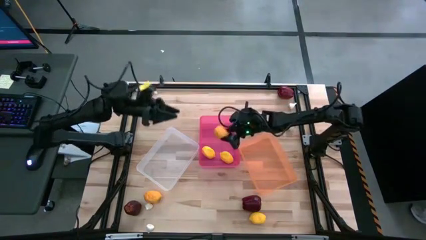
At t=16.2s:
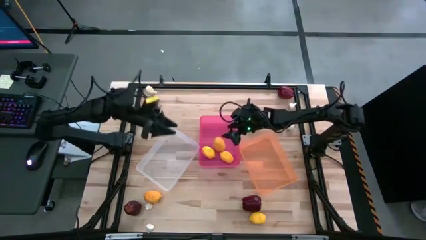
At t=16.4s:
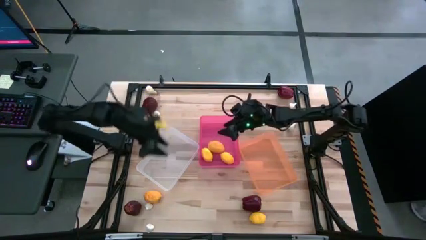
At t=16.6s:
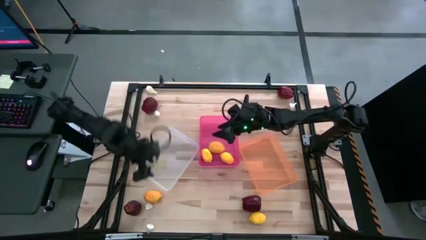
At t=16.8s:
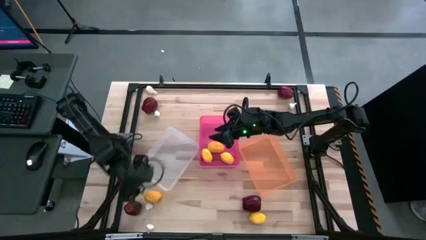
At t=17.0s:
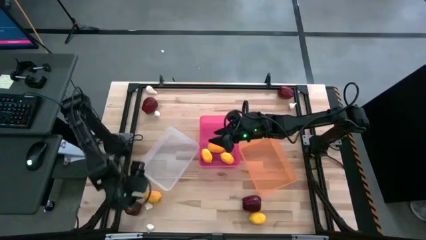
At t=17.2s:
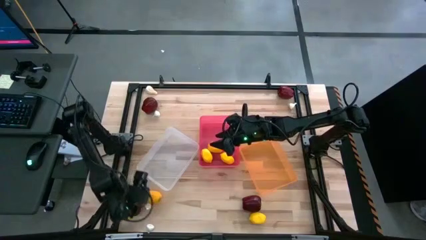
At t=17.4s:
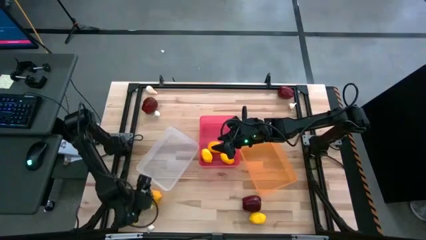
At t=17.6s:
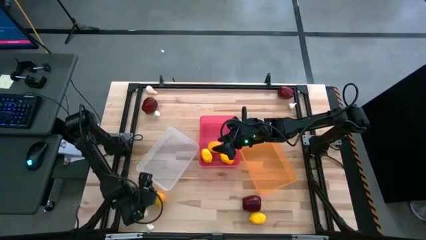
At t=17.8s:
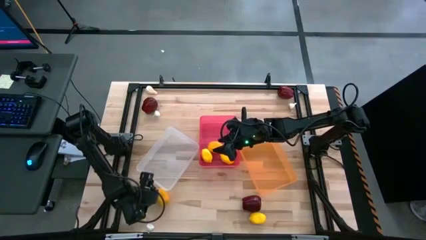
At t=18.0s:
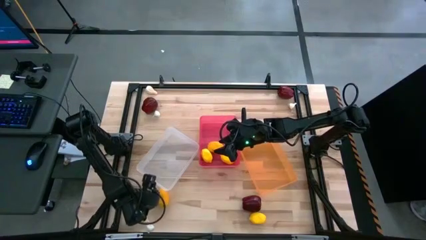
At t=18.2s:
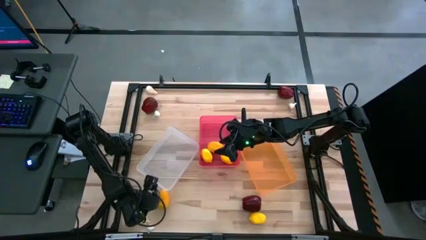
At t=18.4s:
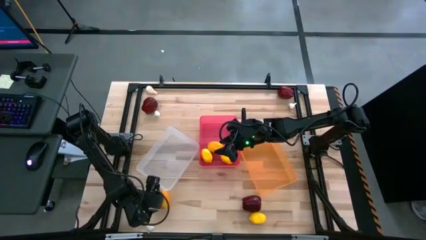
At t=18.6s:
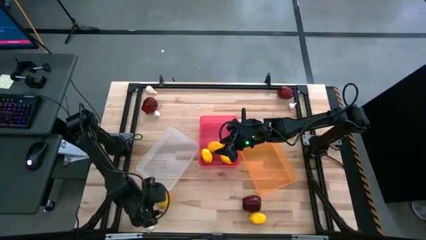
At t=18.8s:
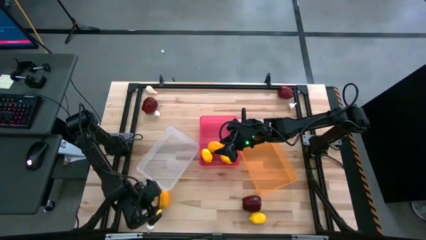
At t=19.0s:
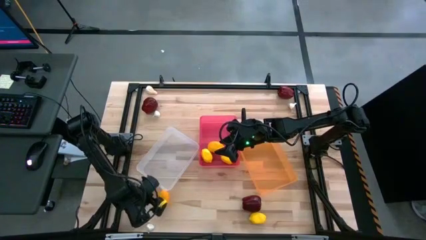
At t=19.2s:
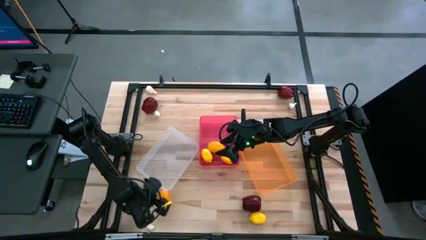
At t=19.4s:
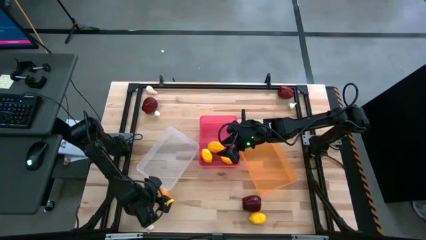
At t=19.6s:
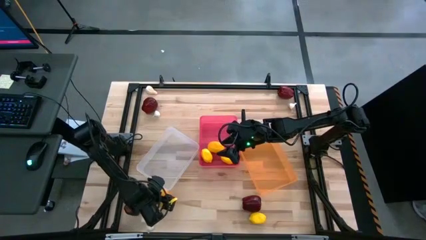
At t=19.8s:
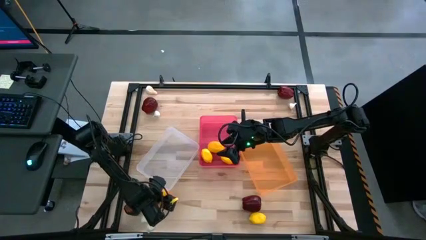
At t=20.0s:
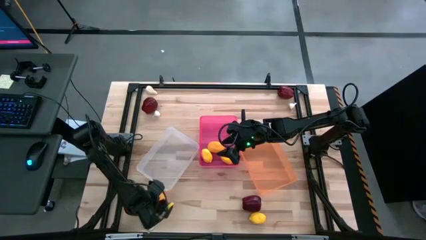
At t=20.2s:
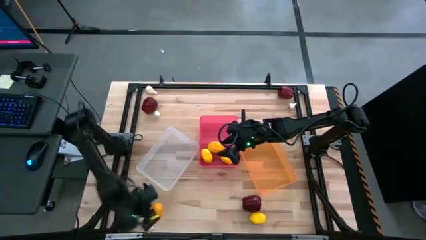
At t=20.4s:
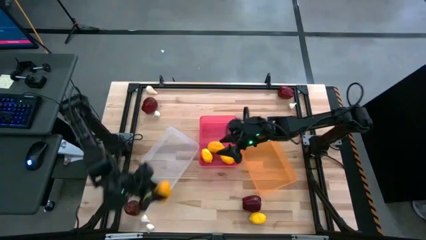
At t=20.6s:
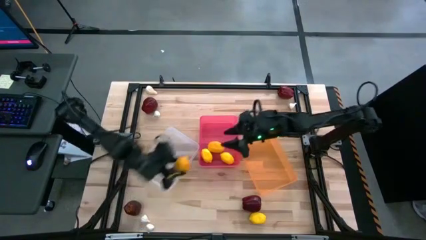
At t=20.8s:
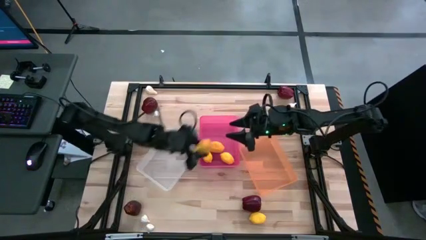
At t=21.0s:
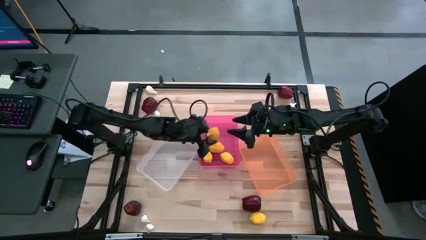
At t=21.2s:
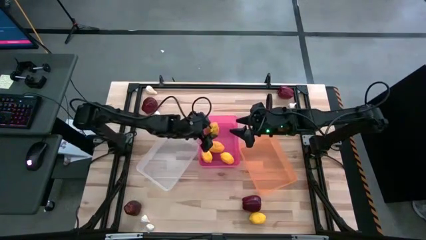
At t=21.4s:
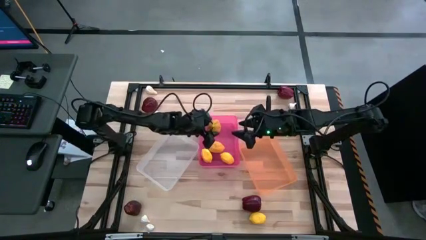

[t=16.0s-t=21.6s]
Task: Sort produce into baskets
Put the yellow lemon into the red bin

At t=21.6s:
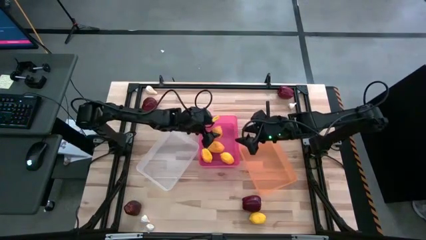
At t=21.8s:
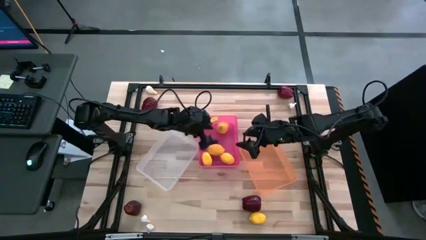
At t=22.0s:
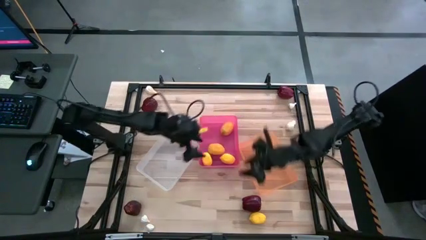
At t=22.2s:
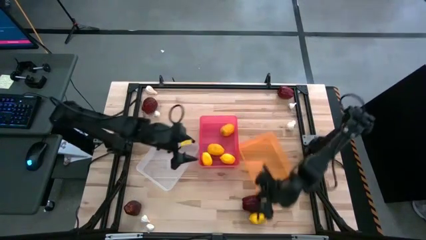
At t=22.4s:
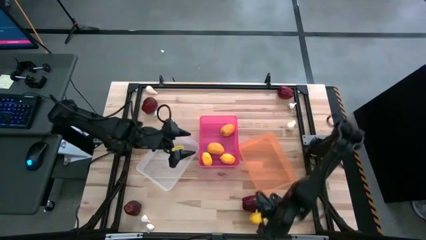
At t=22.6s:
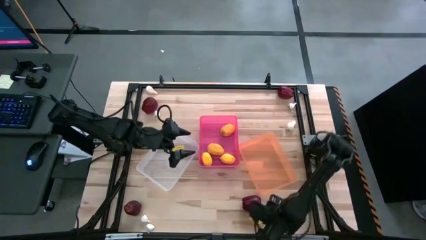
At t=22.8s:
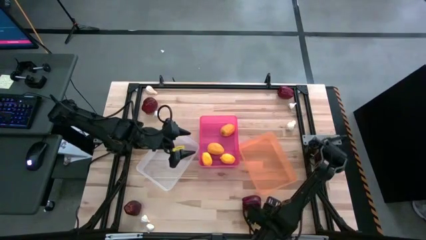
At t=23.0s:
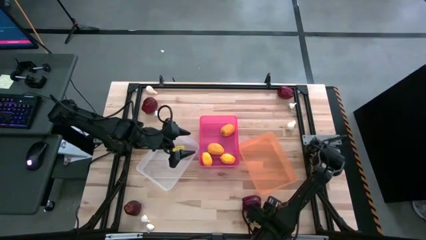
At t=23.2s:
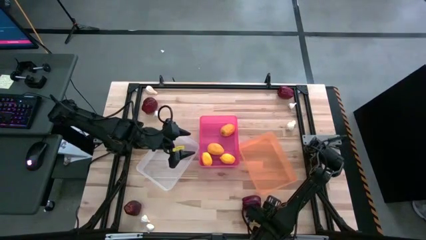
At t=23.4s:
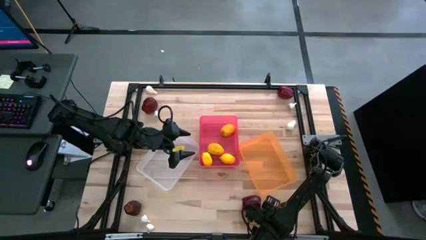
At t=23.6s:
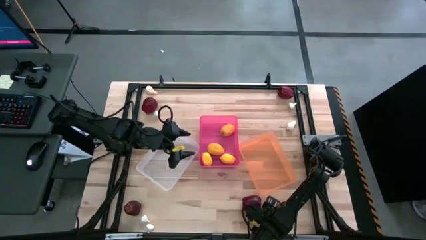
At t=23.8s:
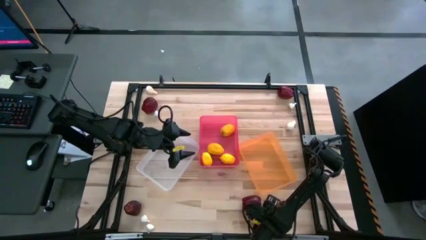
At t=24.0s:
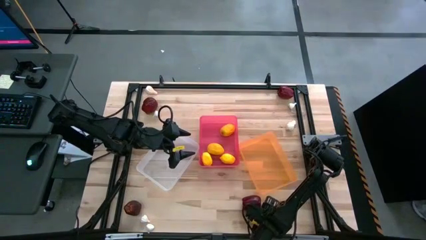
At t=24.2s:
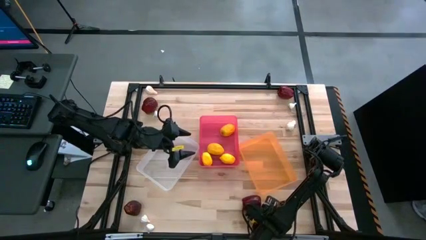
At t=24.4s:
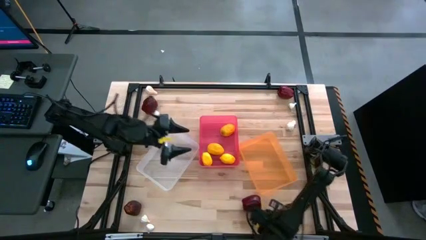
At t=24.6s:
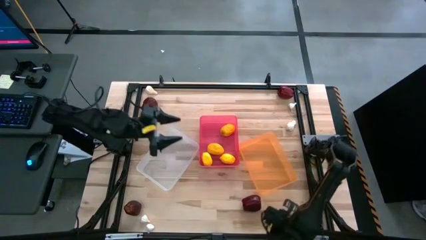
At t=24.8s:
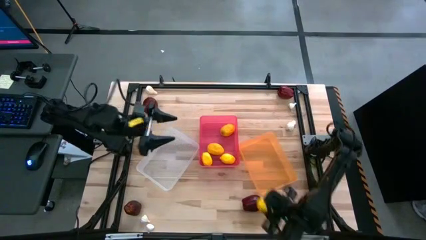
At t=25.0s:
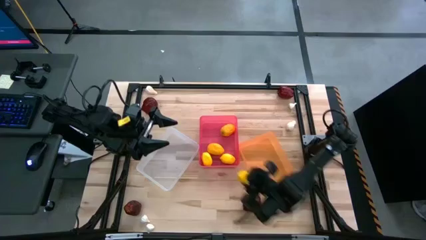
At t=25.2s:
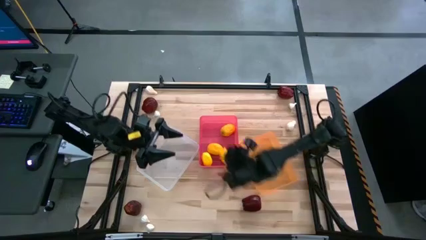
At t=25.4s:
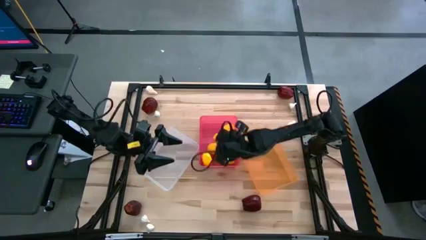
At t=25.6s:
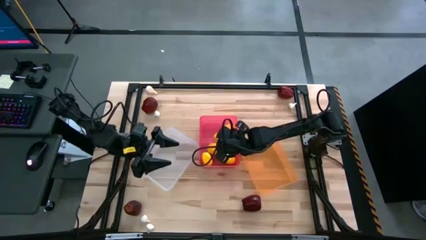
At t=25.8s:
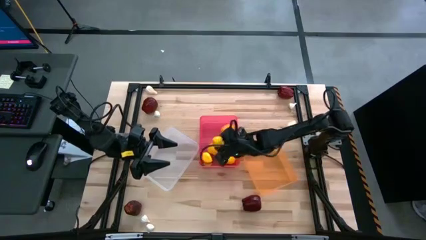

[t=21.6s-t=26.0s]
Put the yellow lemon into the red bin

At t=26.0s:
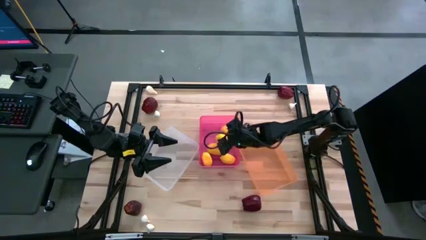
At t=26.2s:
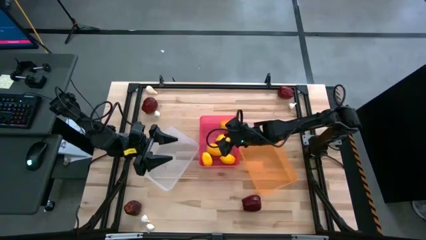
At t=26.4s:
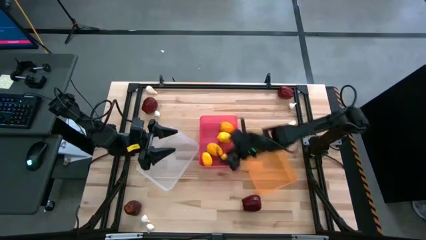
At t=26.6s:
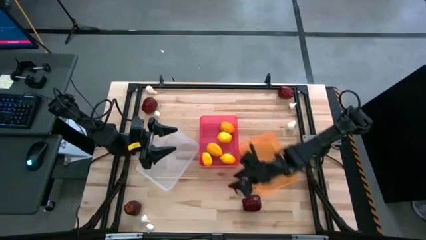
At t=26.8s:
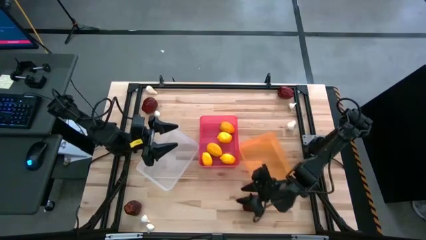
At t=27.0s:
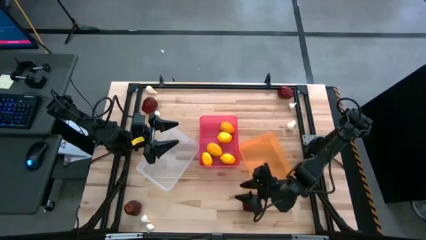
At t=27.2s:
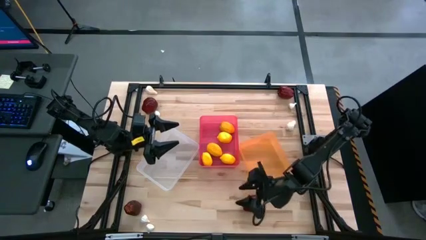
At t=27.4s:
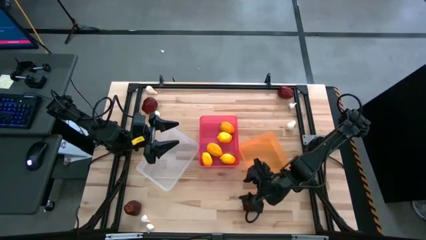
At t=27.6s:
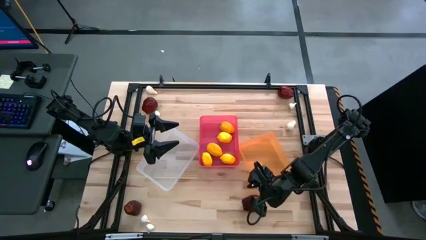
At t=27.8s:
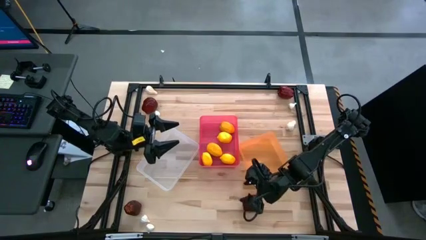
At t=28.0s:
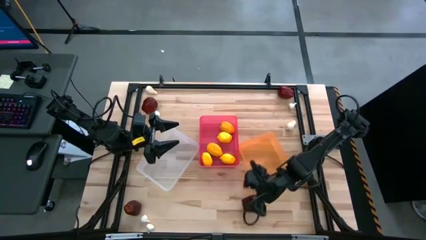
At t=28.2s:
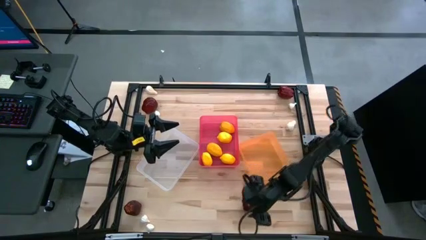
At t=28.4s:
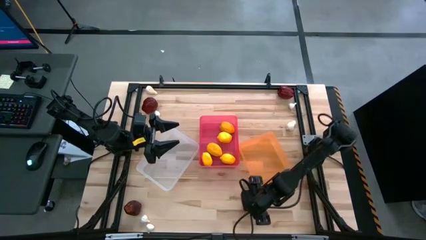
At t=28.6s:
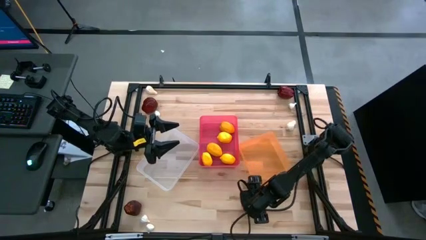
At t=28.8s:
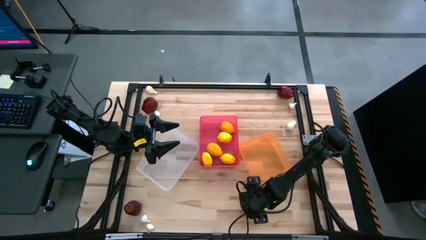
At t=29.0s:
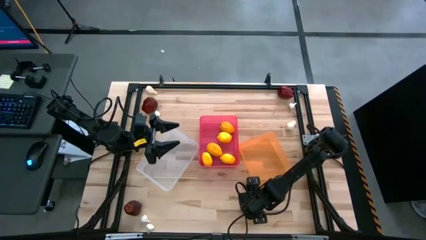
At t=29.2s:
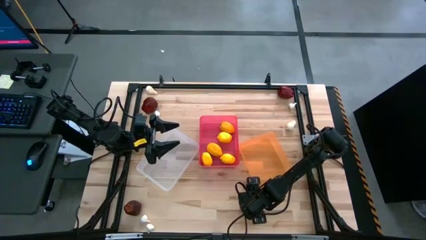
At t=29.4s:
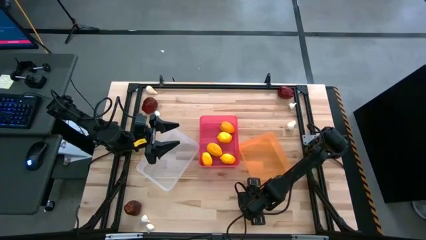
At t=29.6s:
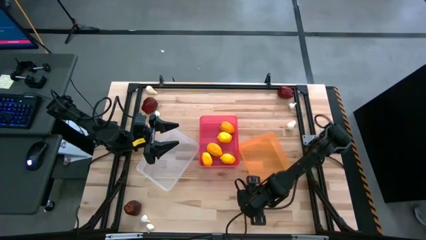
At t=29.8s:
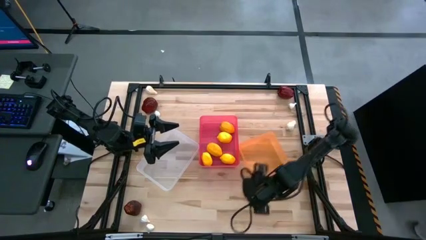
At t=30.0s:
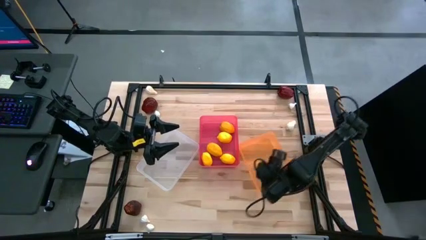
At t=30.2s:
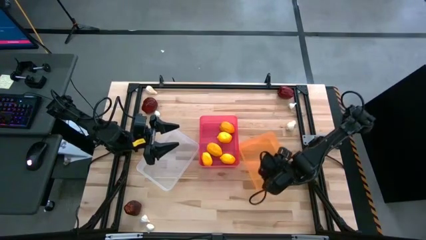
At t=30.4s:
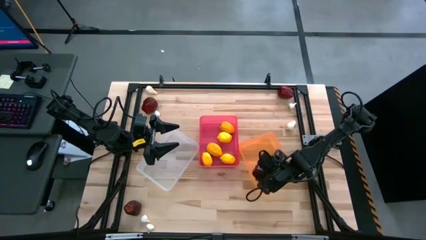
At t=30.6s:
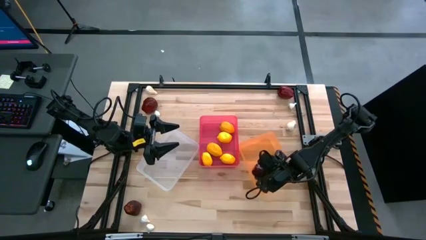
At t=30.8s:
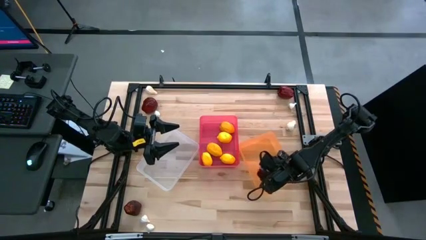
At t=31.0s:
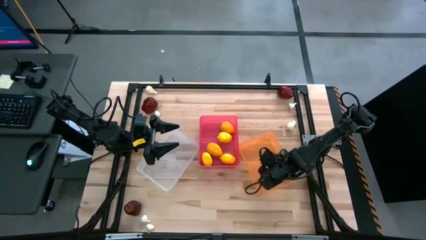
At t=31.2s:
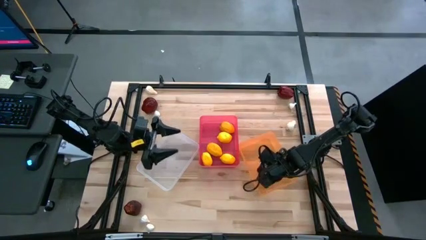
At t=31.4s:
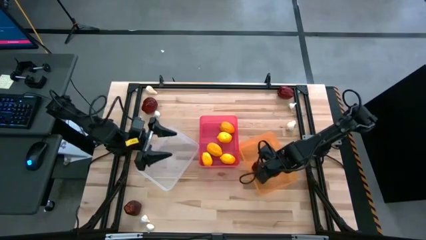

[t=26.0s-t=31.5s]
Put the red apple into the orange bin

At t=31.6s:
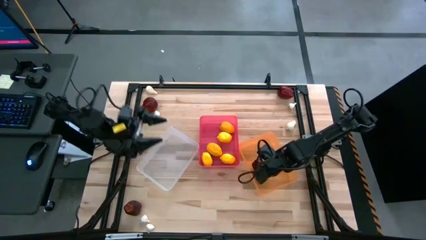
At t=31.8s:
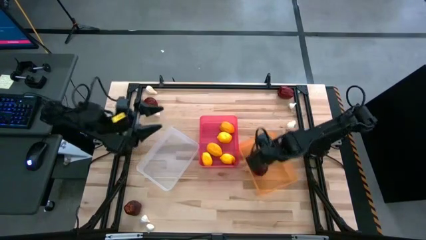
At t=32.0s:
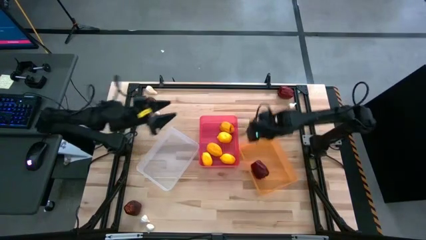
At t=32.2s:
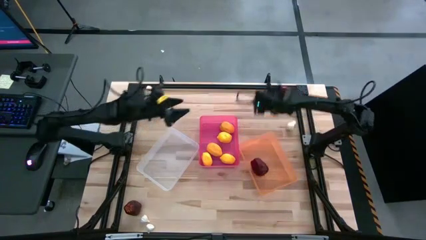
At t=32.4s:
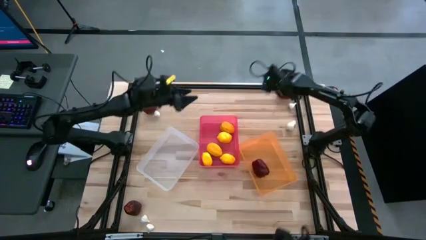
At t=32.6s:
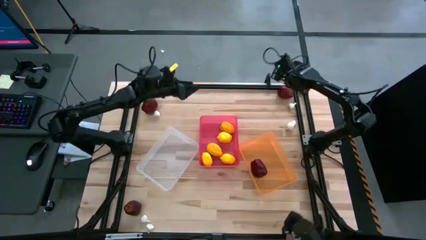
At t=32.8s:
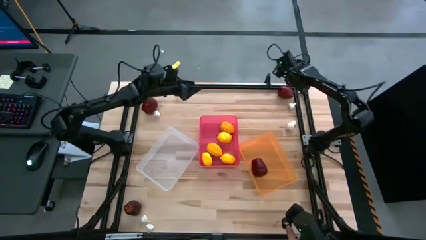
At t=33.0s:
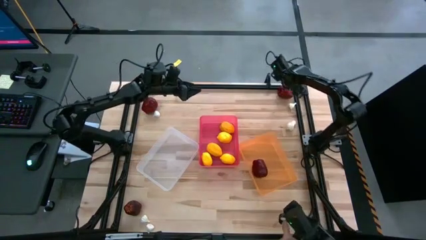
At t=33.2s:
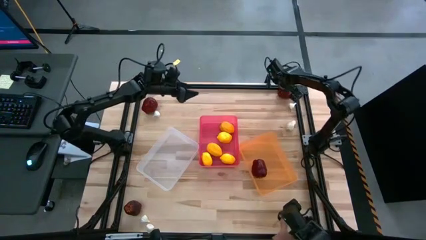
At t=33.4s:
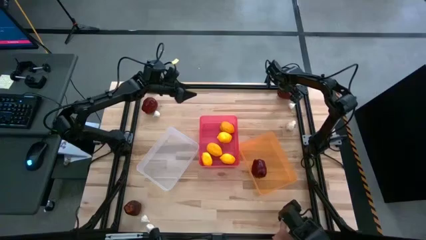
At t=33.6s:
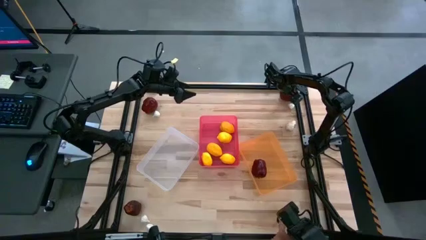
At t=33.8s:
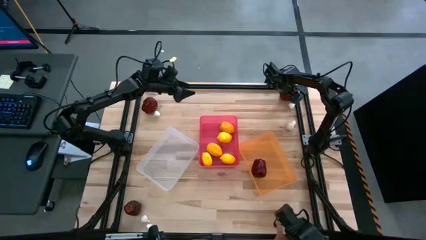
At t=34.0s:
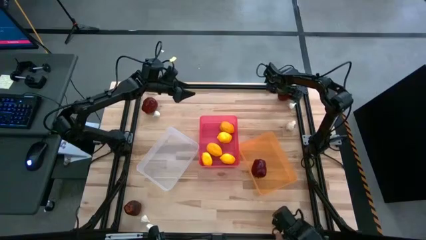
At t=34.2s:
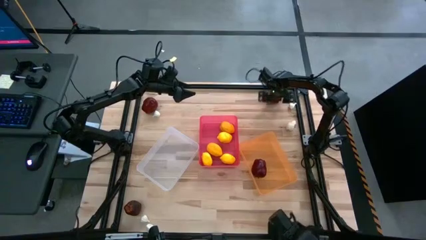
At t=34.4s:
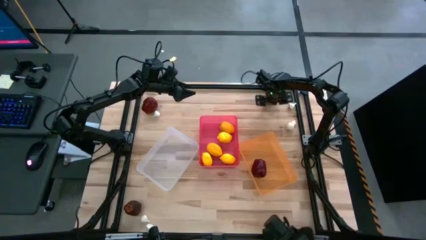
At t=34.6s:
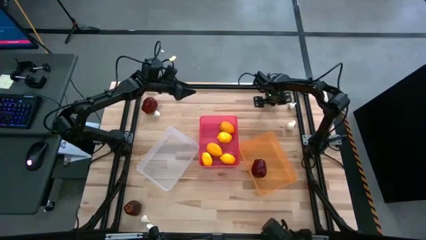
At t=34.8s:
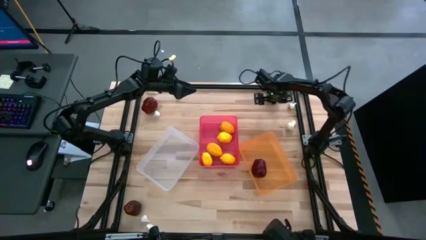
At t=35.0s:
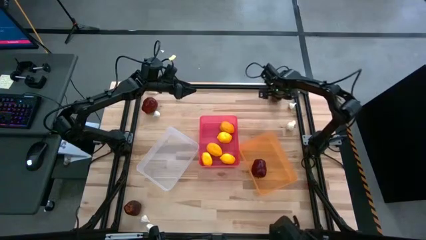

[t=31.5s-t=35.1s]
Put the red apple into the orange bin
